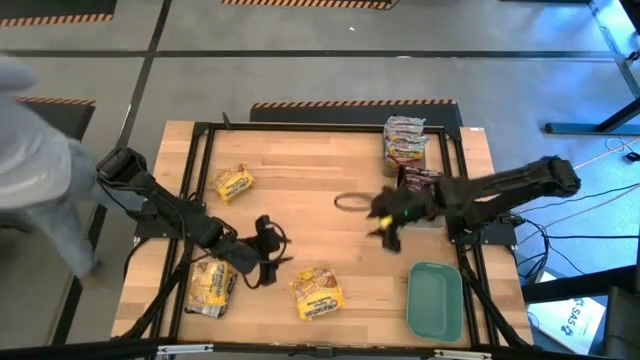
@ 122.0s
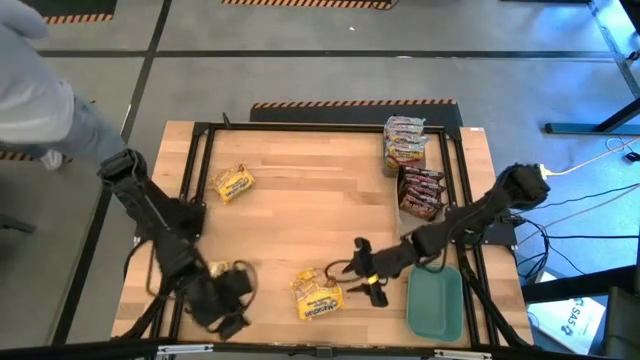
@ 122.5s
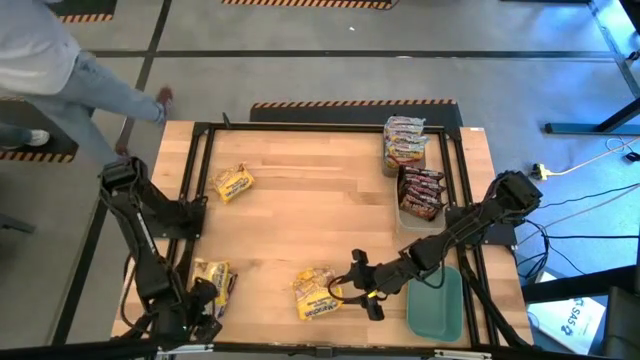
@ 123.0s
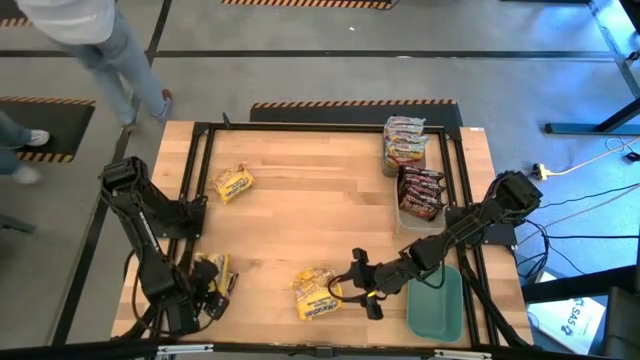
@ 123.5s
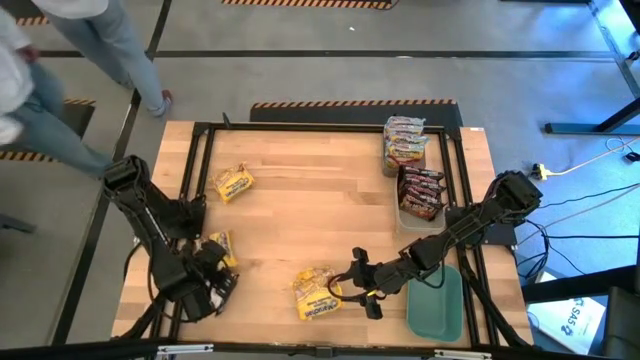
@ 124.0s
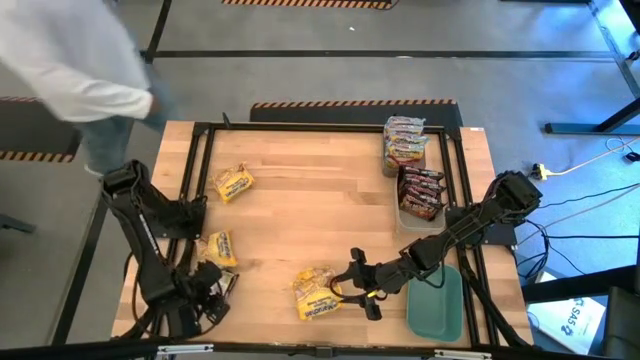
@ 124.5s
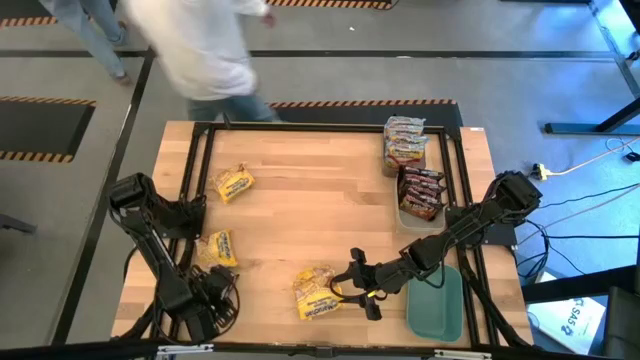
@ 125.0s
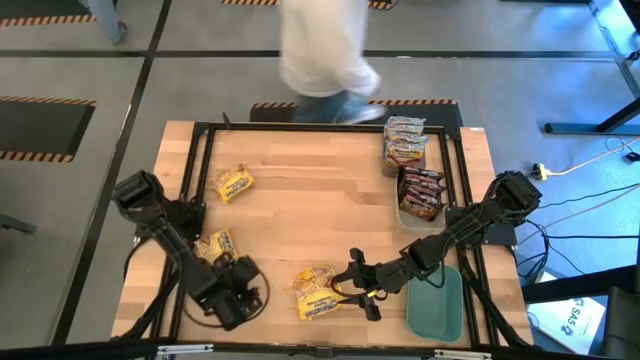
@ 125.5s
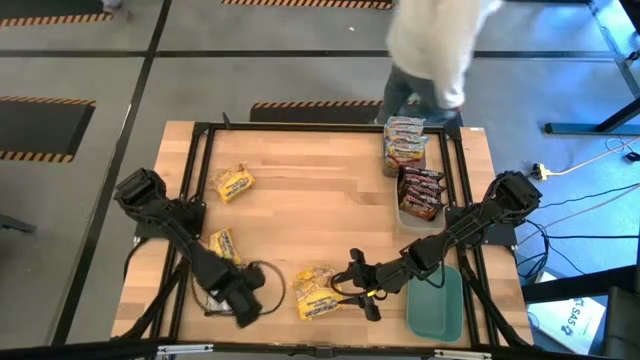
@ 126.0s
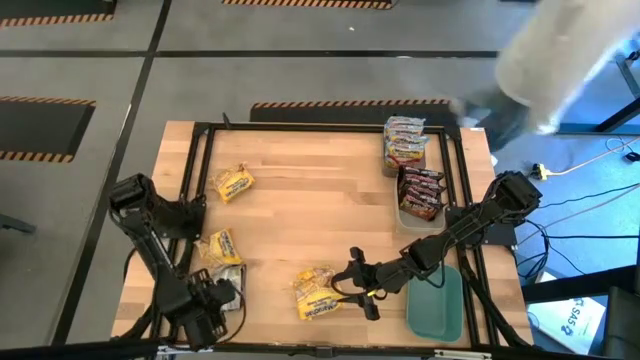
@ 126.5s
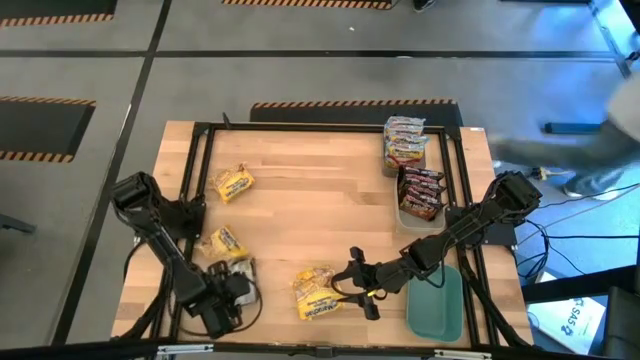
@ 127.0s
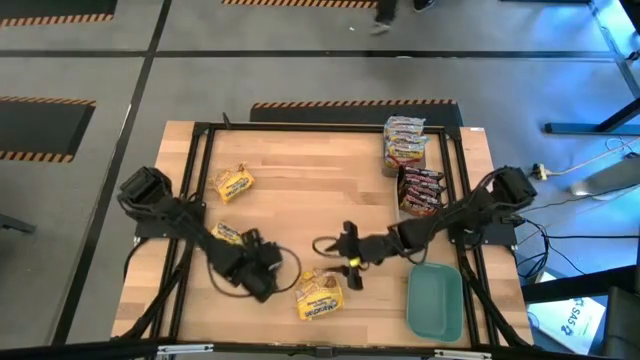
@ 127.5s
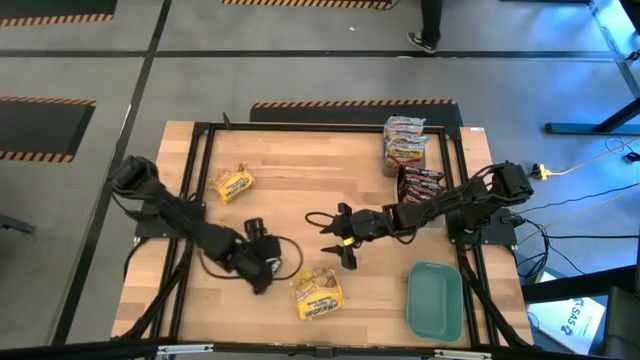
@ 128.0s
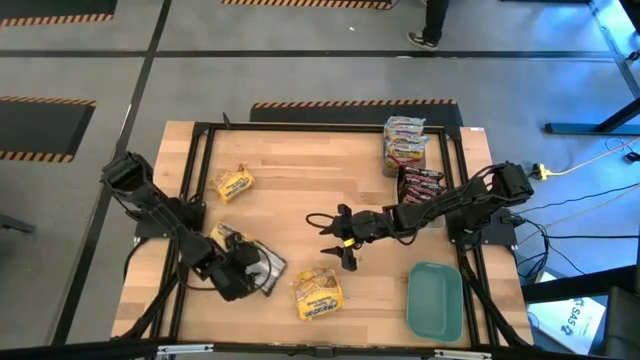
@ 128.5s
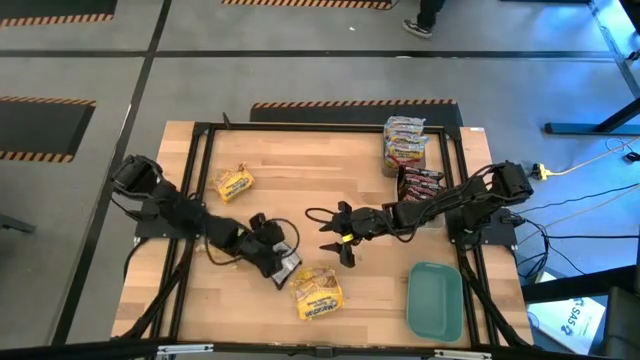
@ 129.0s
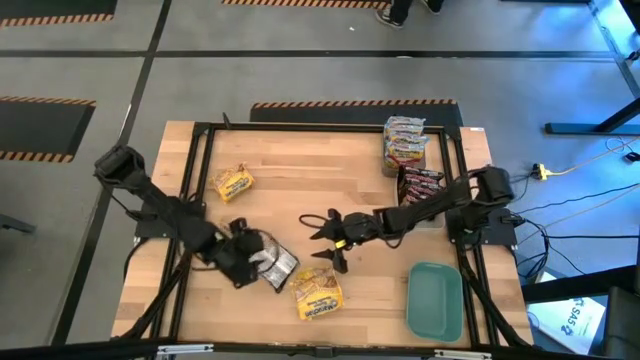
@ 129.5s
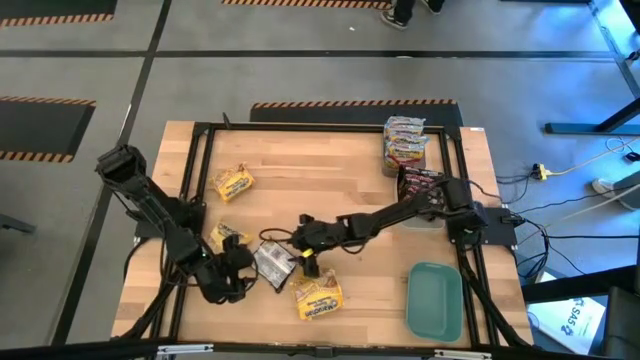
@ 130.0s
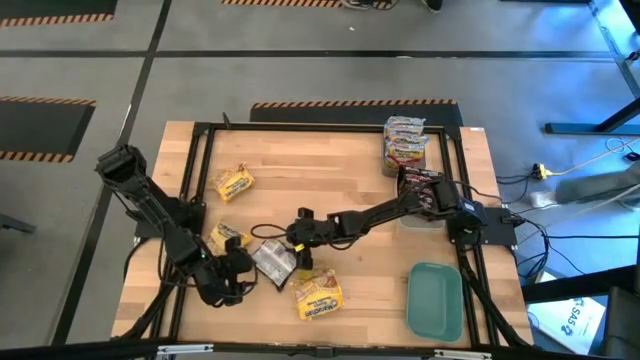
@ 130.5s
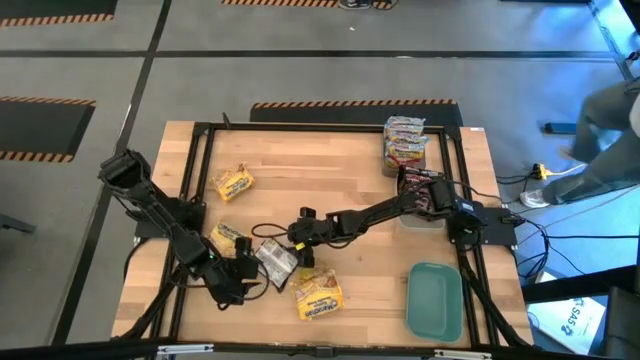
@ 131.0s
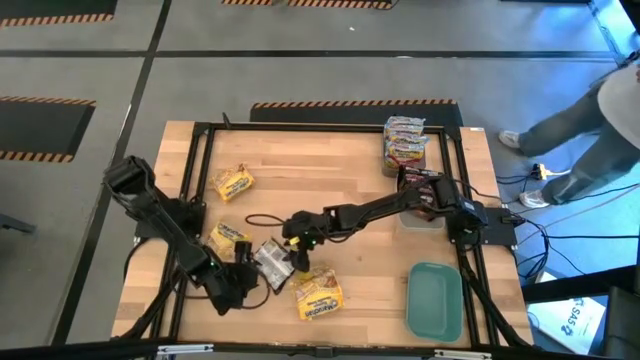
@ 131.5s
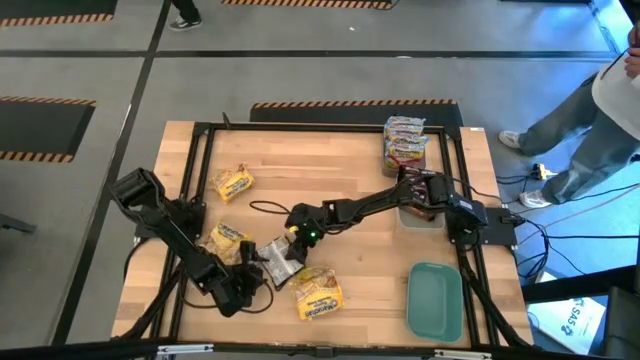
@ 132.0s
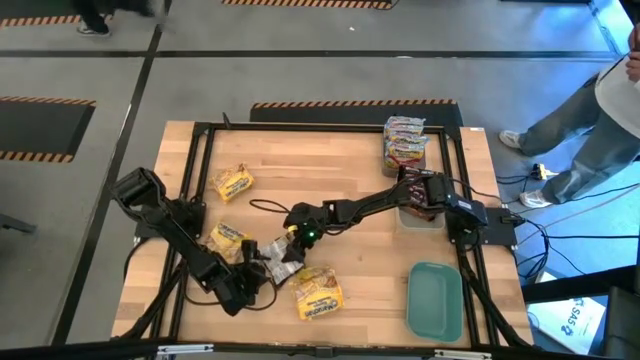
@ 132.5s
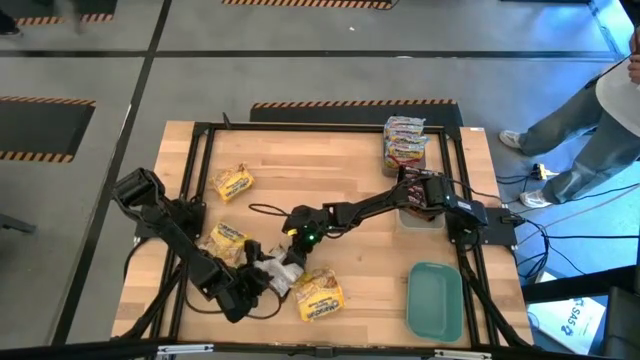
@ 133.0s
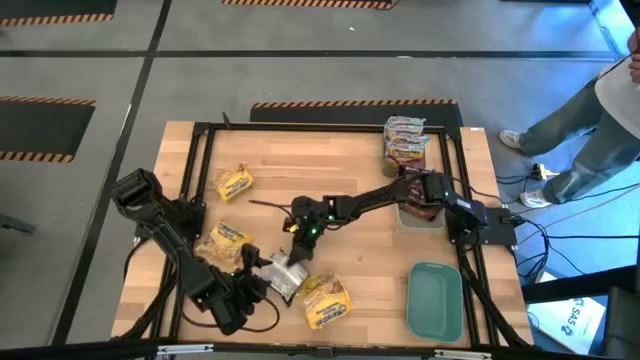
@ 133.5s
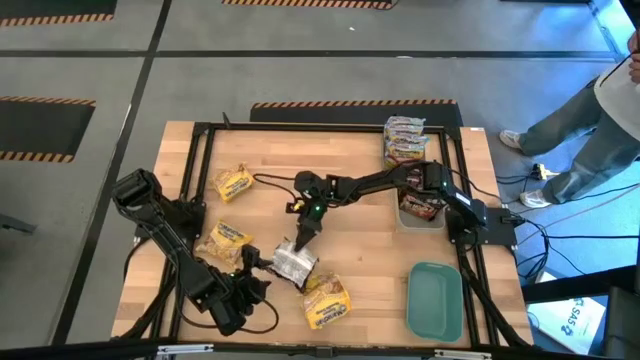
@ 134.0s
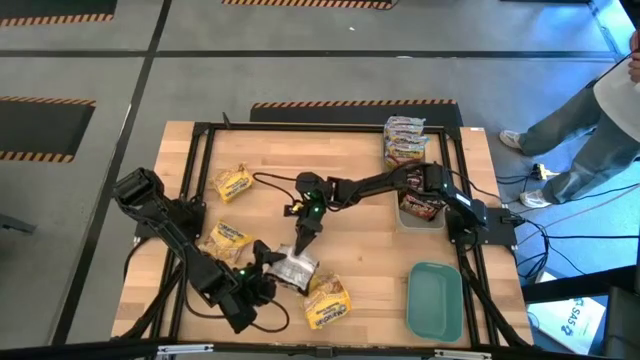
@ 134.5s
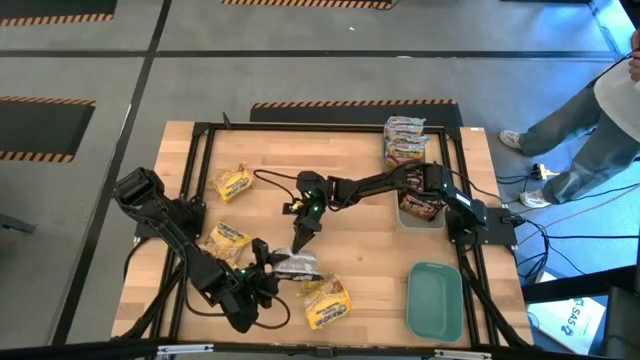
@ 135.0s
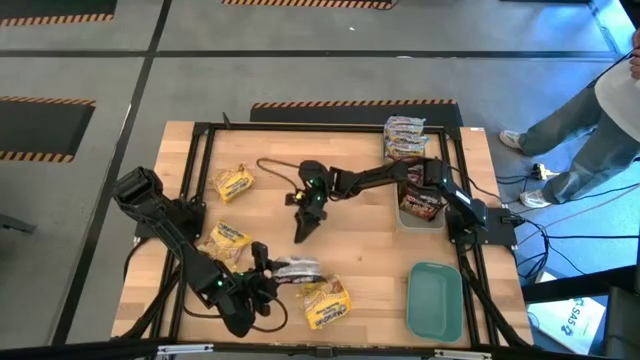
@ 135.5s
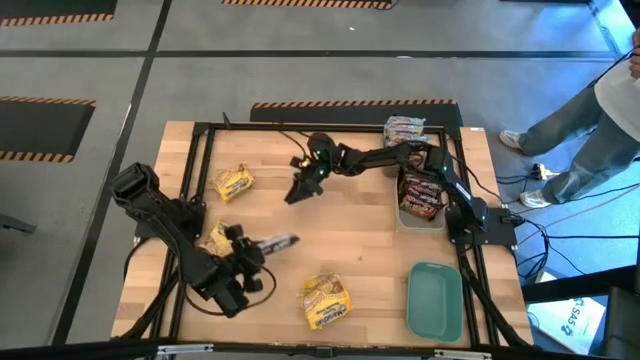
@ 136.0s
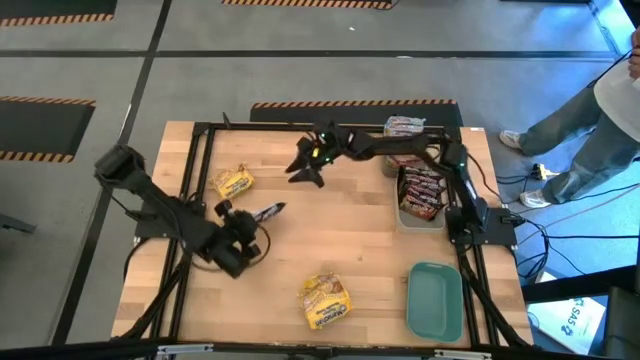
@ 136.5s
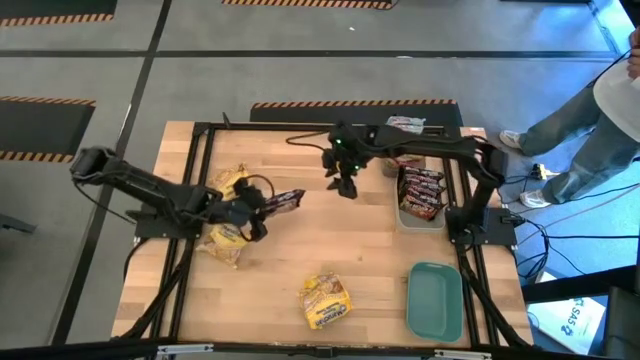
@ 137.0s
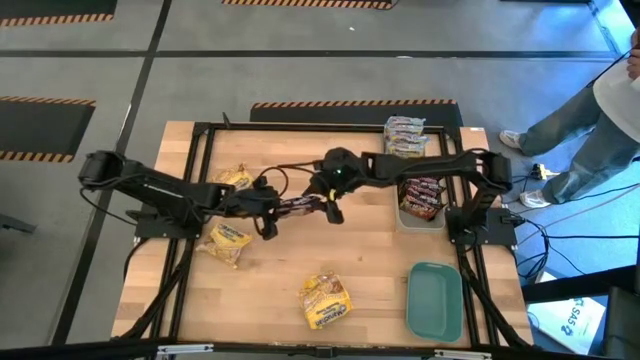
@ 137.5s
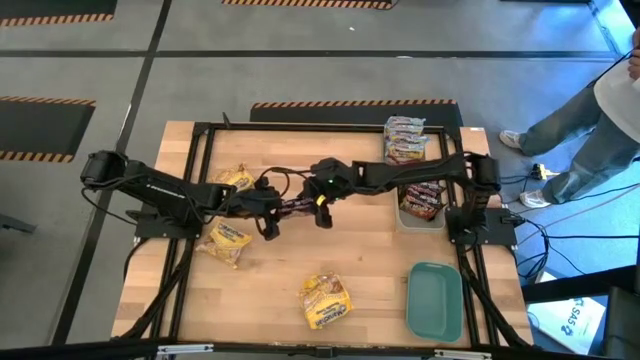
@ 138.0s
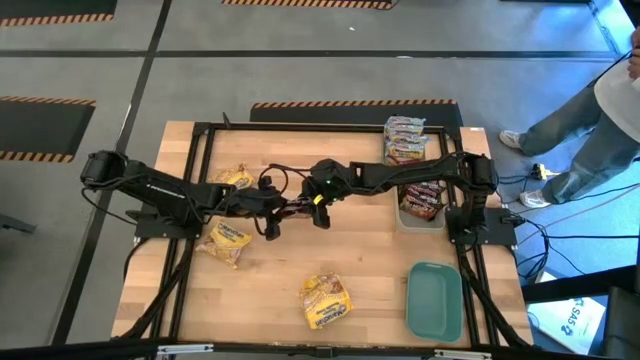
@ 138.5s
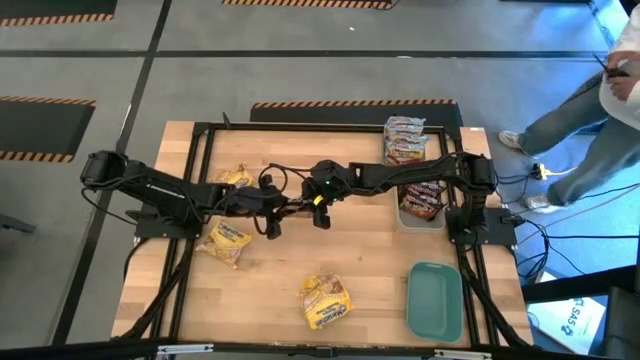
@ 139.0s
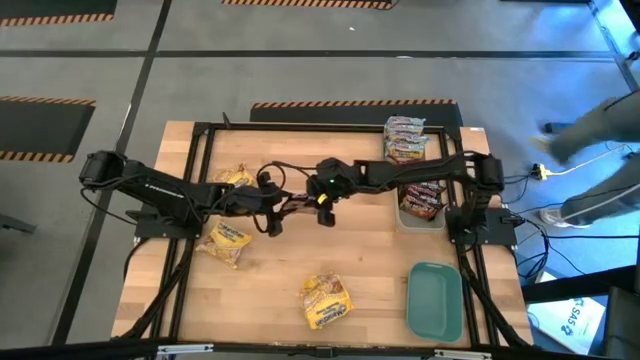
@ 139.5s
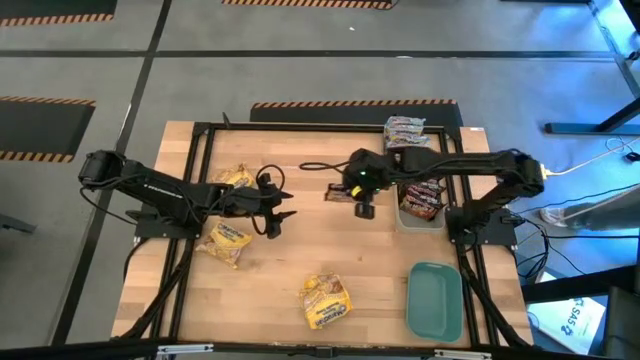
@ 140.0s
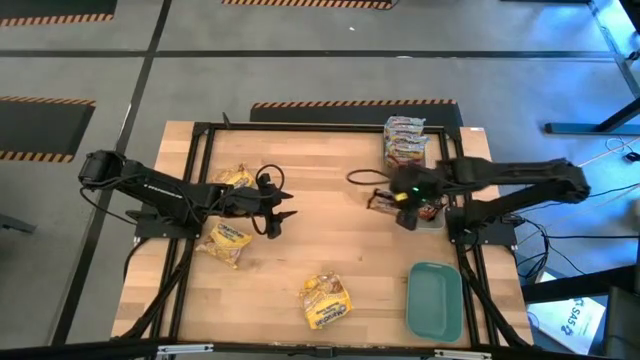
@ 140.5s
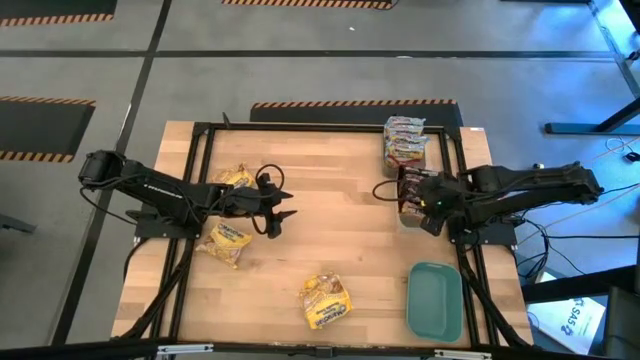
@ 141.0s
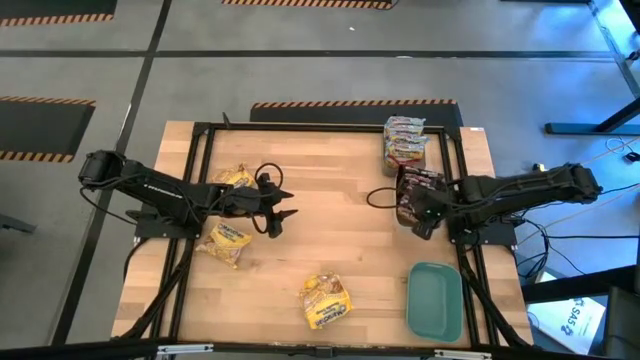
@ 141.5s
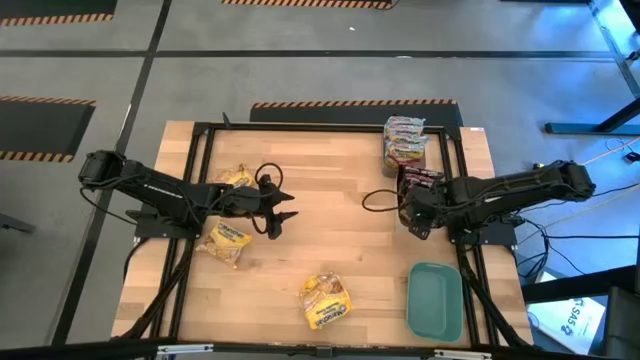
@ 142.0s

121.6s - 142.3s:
Task: Sort Maruchan noodles
Put the black noodle pack into the gray bin

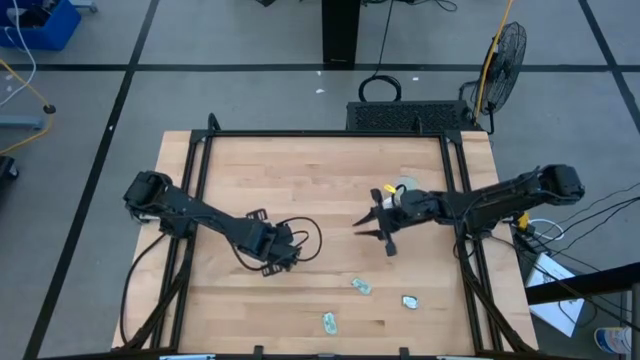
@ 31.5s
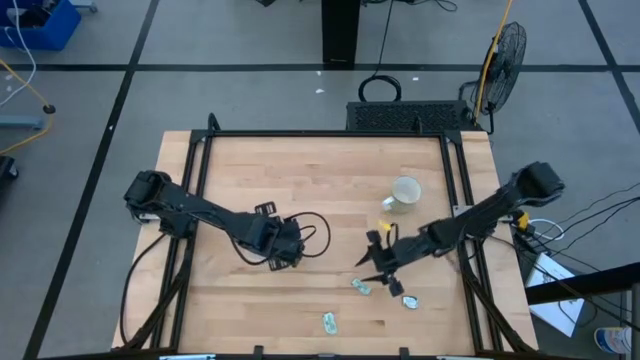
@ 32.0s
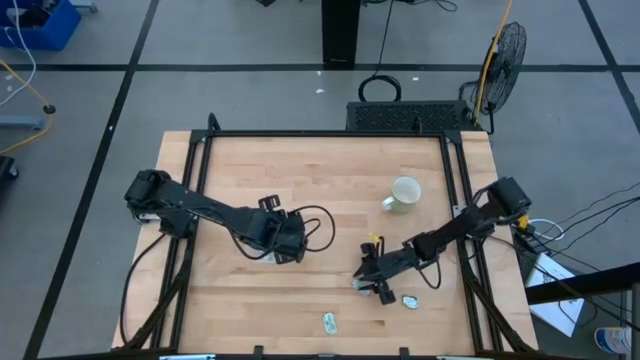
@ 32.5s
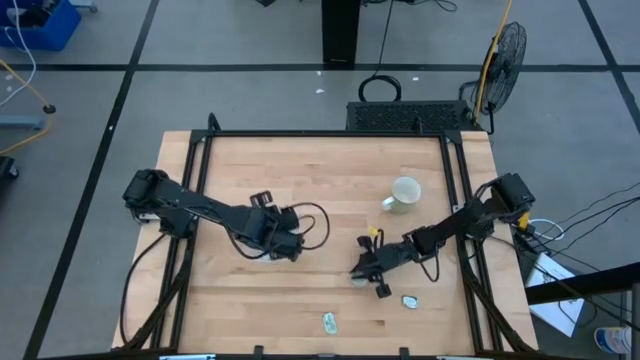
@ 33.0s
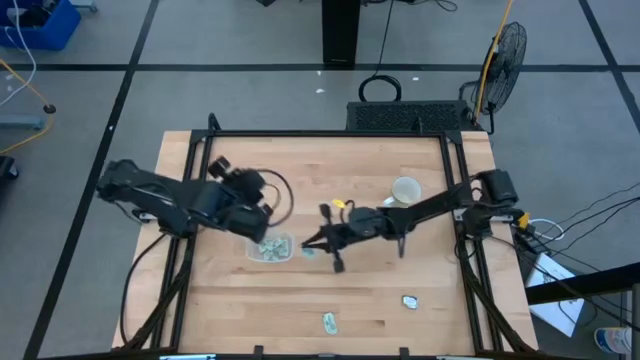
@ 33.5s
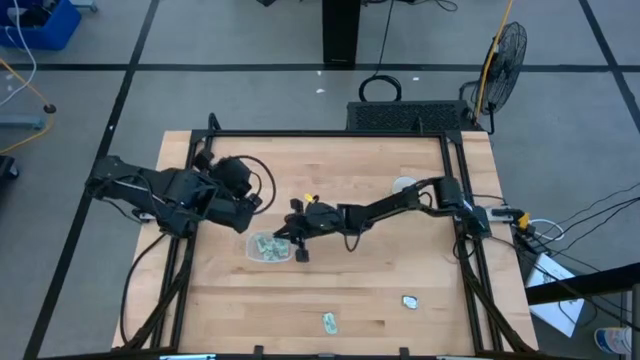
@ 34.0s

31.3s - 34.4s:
Task: Pick and place Stevia / Truvia into bins
Put the stevia packet into the transparent bin
